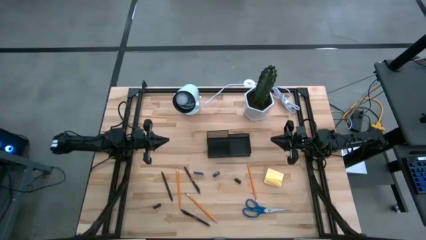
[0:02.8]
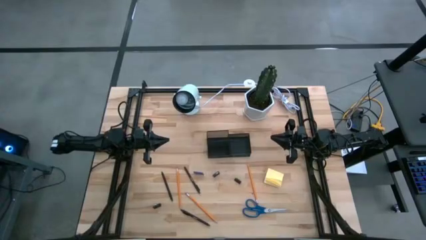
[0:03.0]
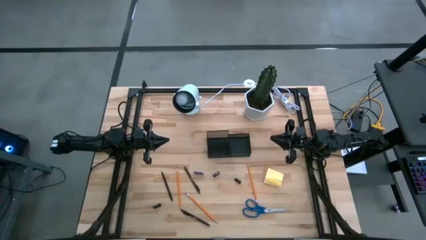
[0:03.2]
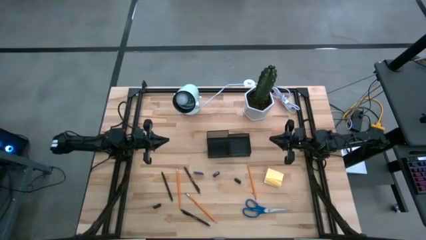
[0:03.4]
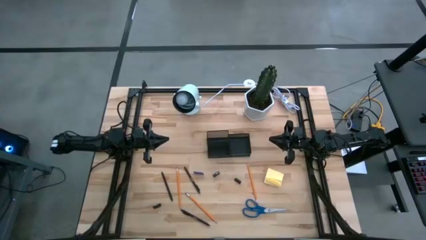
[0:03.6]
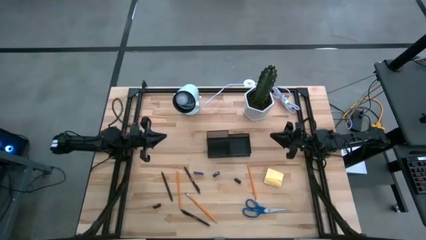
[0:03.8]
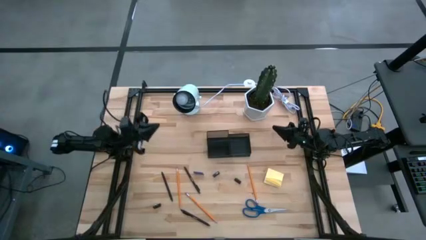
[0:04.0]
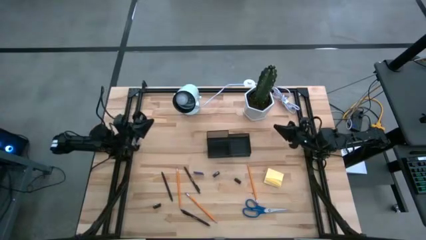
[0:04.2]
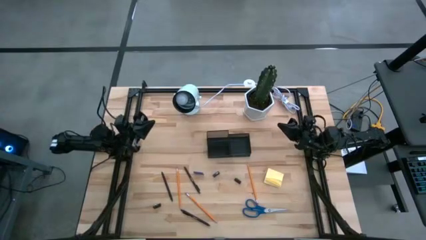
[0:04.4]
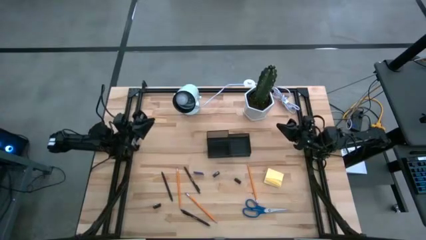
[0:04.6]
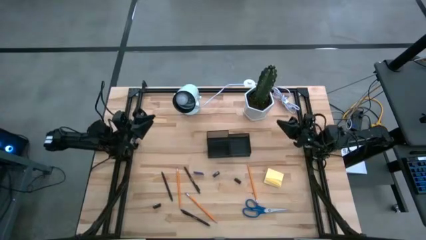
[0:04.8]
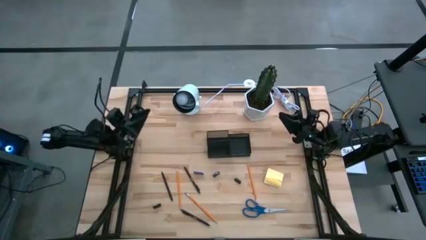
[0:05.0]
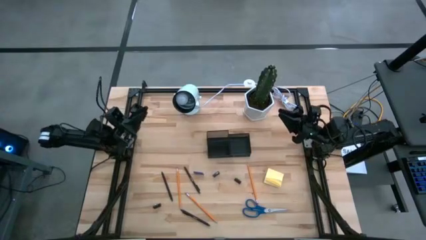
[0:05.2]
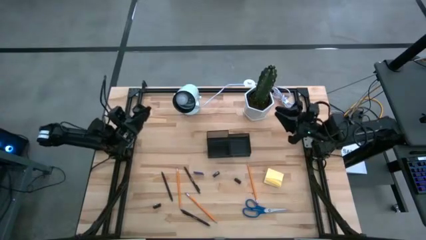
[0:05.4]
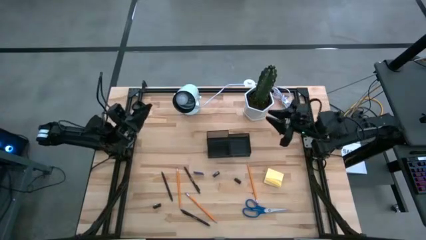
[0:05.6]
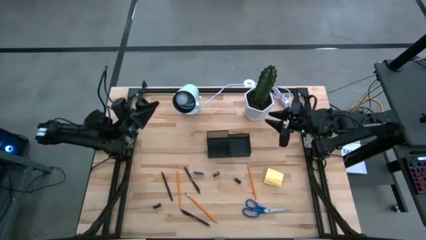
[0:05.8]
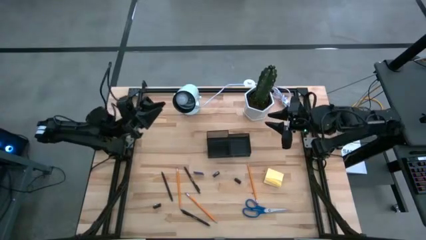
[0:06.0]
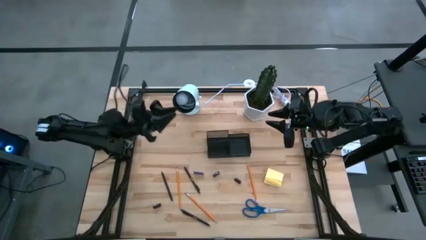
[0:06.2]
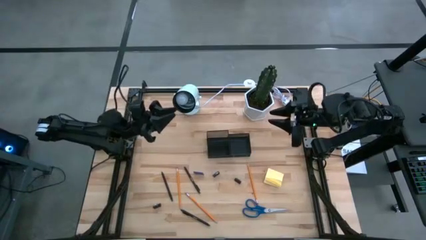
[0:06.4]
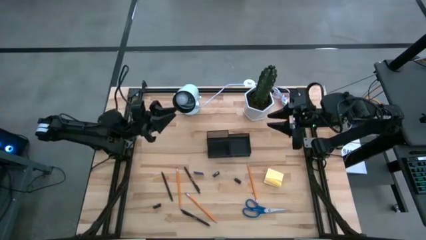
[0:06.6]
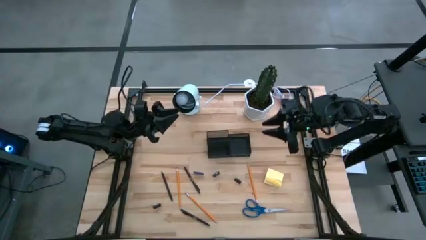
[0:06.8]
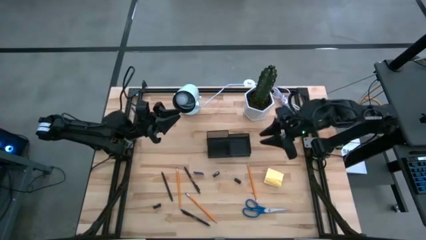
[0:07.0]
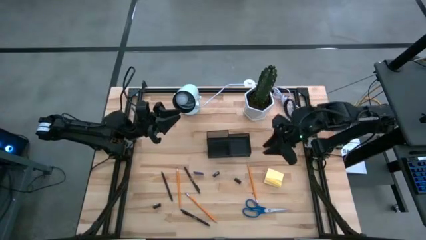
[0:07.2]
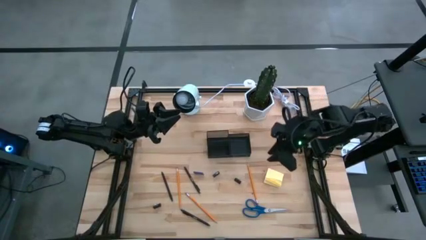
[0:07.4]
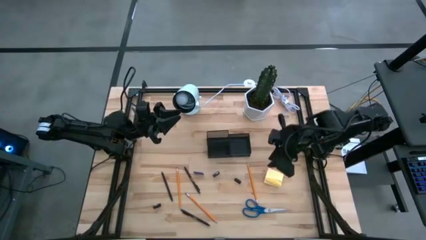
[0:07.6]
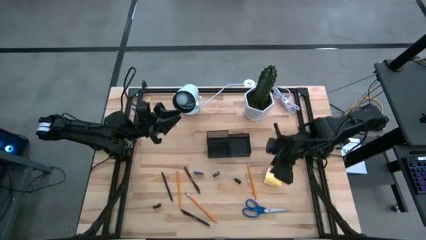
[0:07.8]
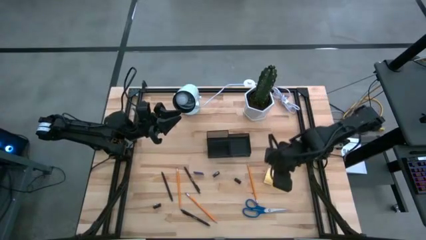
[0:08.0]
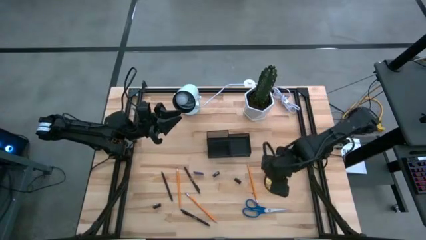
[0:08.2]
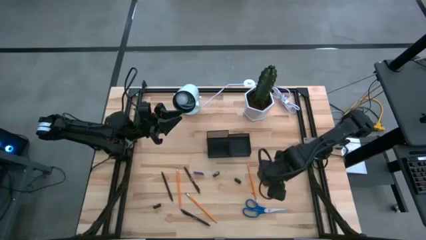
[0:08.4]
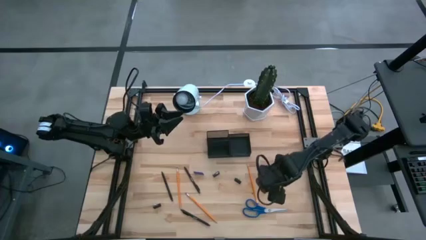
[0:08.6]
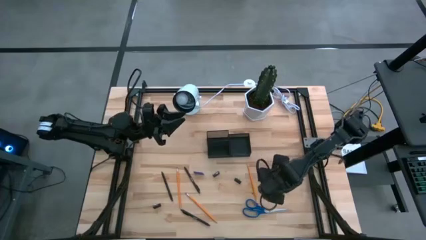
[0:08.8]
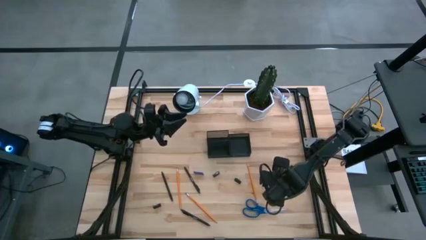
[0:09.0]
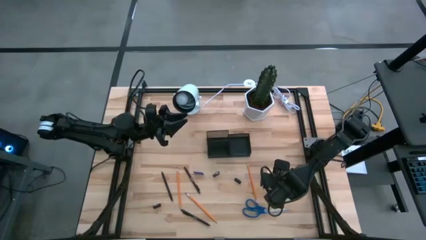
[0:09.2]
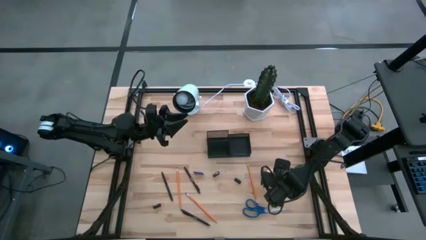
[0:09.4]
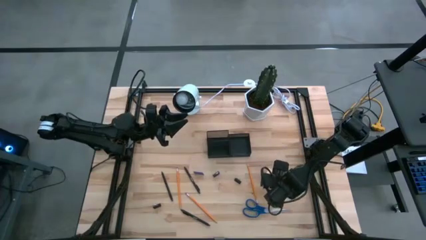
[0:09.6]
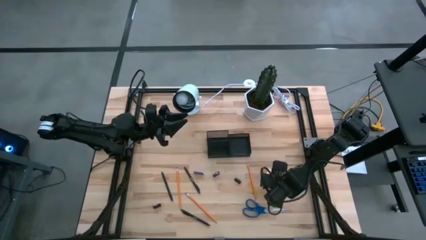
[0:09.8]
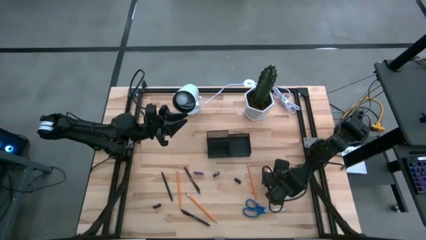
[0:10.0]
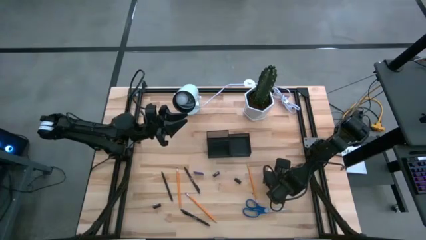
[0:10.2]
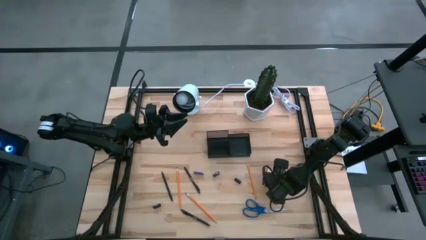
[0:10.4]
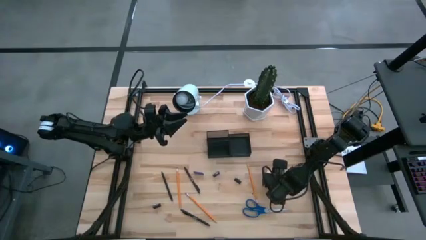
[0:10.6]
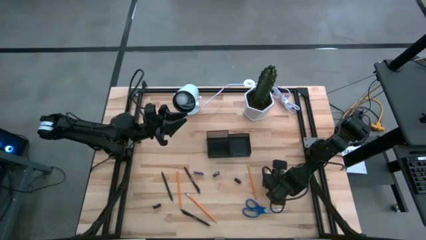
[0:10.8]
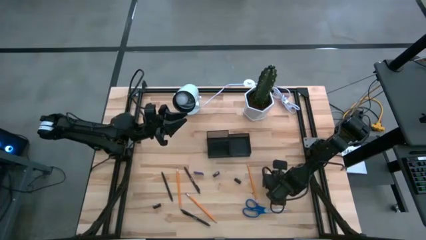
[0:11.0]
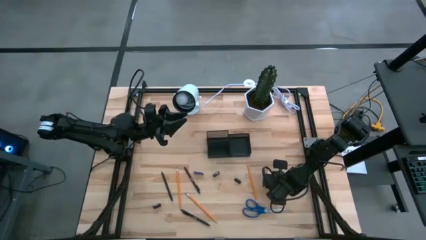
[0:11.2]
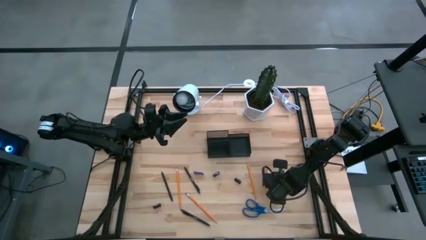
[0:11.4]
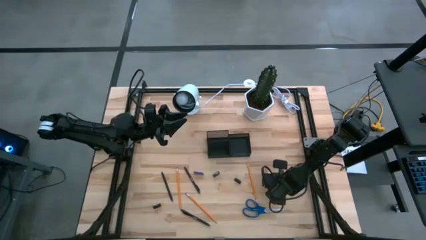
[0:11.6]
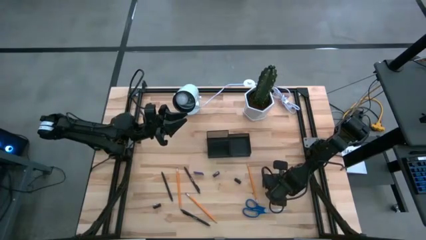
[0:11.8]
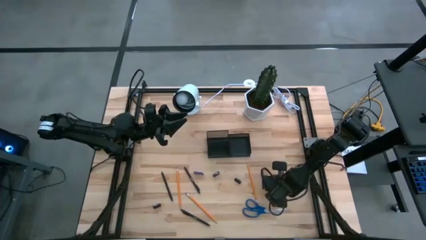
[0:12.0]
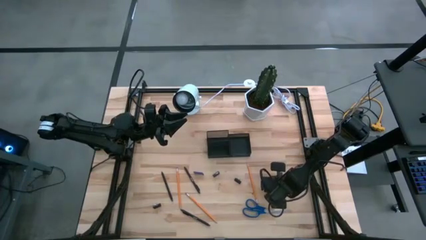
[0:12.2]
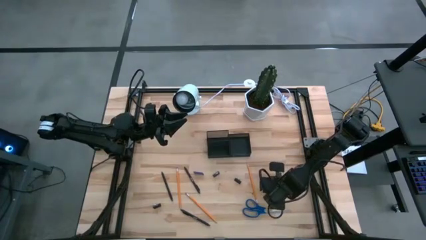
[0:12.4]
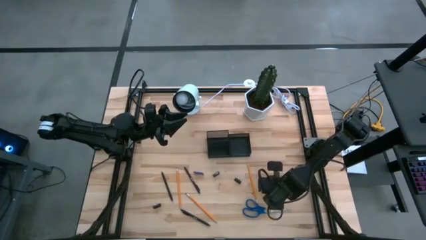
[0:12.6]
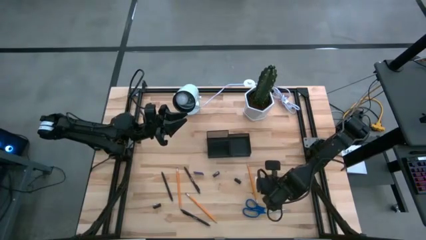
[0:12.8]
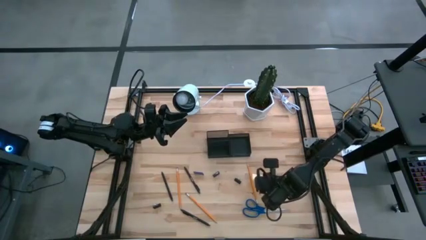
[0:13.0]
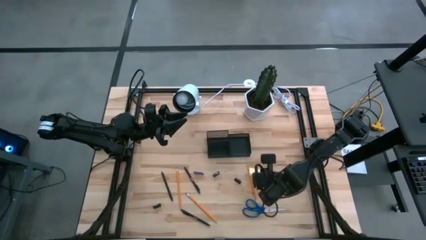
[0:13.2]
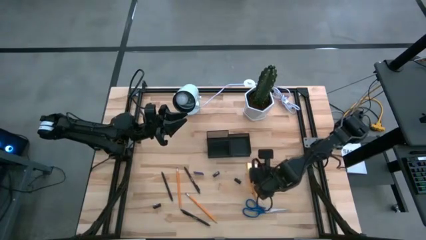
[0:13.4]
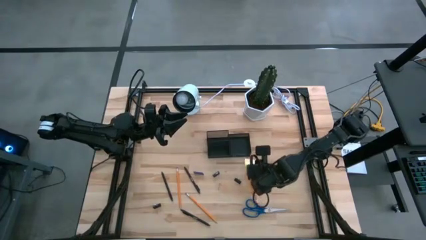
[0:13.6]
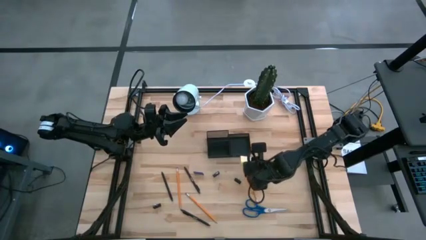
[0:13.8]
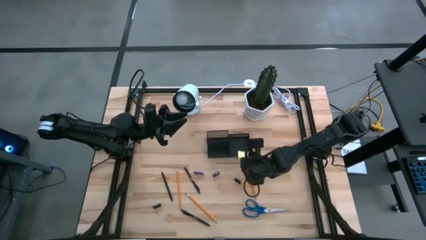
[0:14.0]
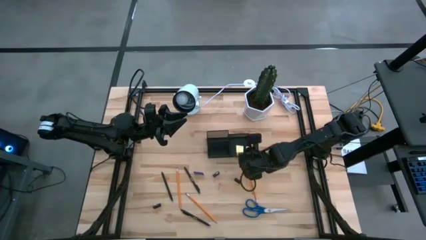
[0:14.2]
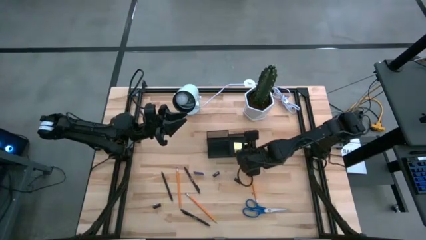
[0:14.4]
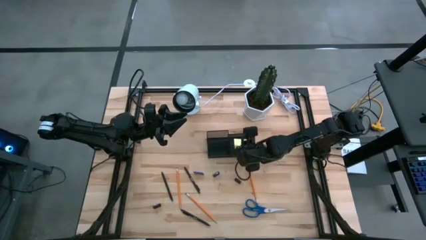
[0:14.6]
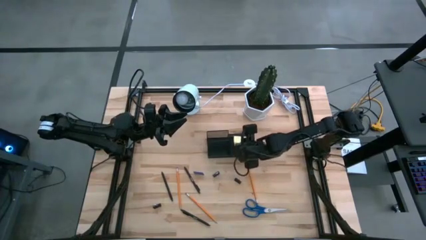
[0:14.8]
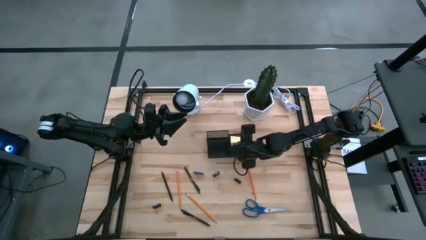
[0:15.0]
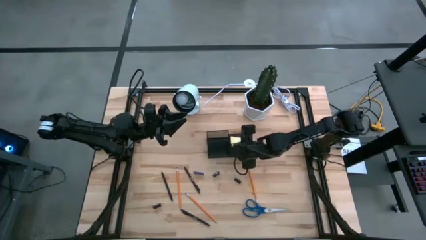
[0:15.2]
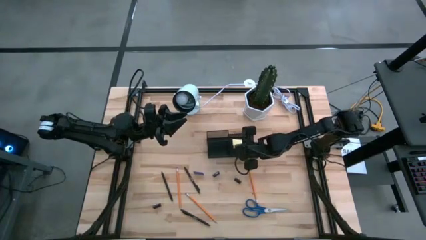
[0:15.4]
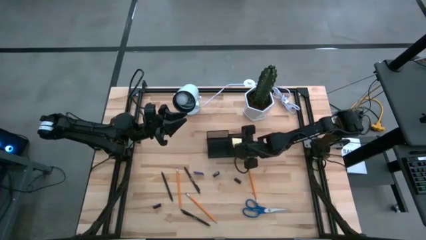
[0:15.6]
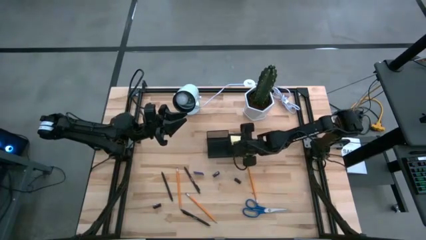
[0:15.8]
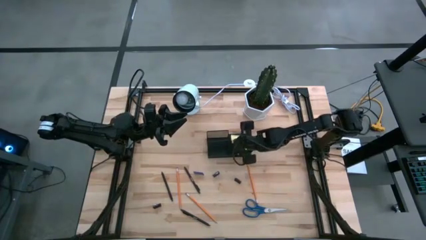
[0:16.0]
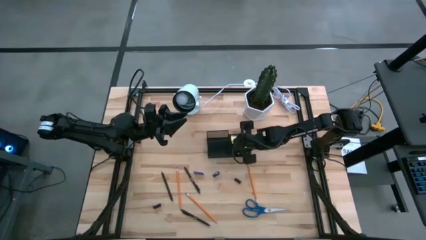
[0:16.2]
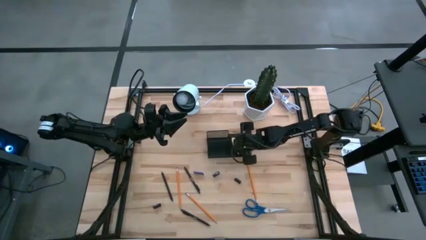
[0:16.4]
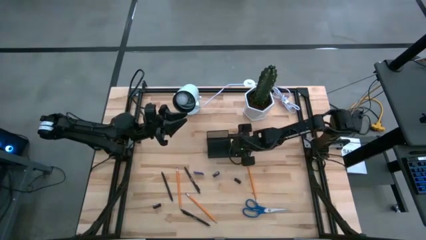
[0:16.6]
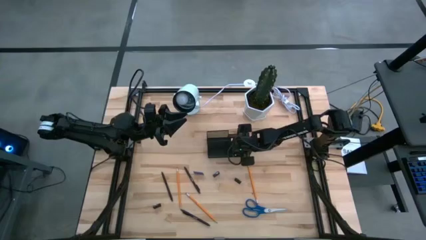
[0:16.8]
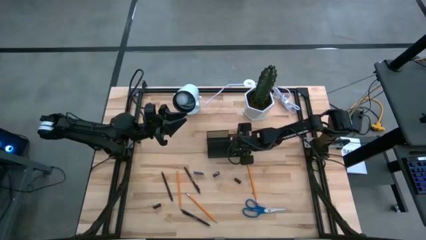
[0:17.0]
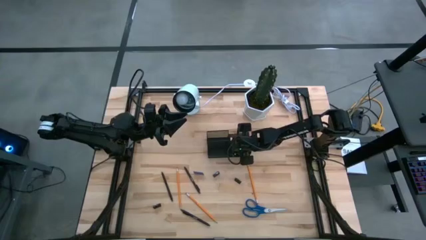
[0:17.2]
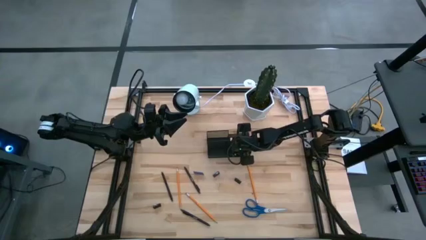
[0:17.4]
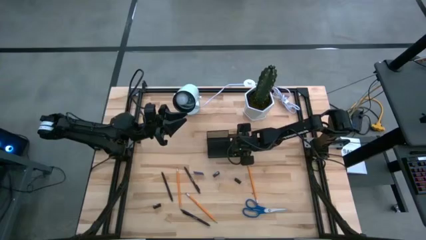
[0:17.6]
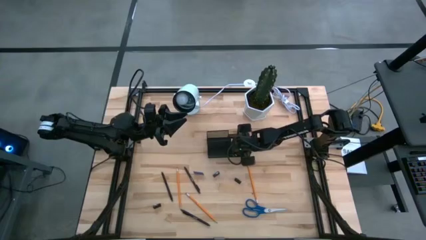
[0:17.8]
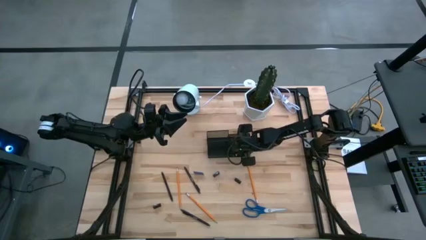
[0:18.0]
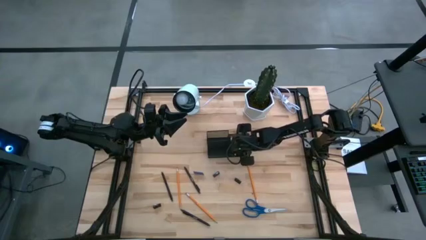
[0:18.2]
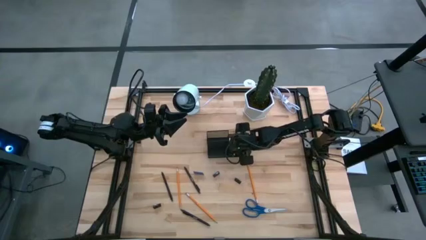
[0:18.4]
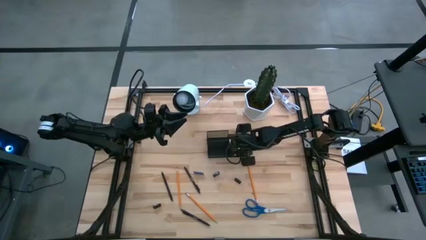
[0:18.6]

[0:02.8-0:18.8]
Task: Pick and place office supplies into organizer
Put the yellow sticky notes into the black desk organizer
